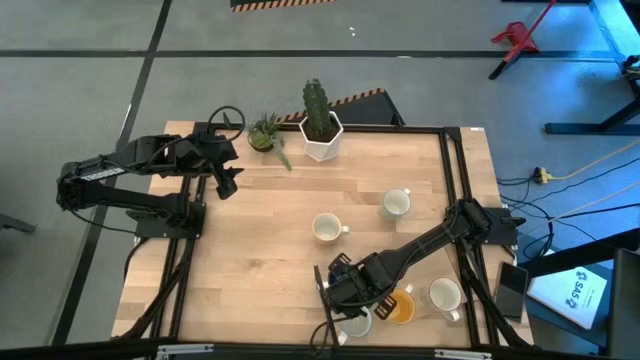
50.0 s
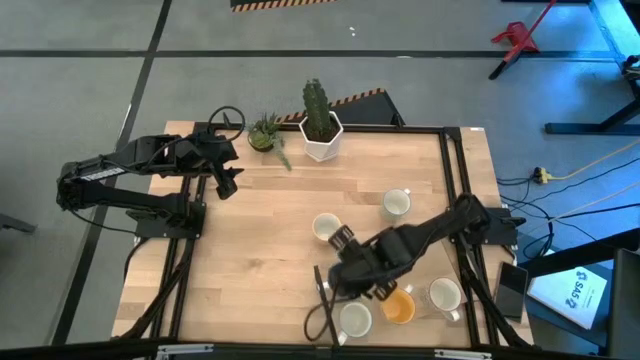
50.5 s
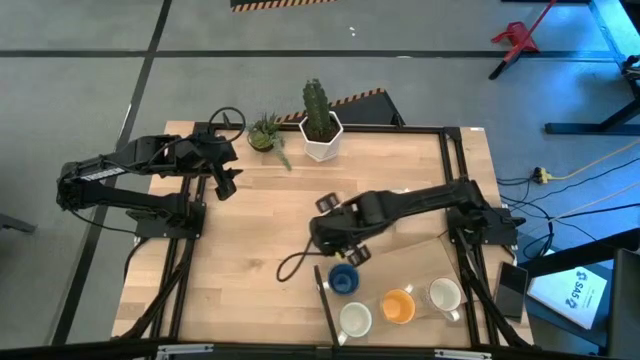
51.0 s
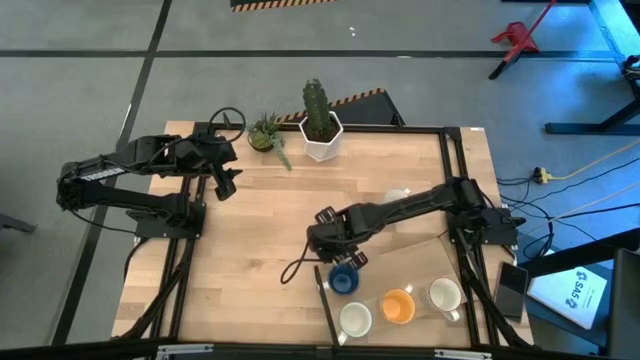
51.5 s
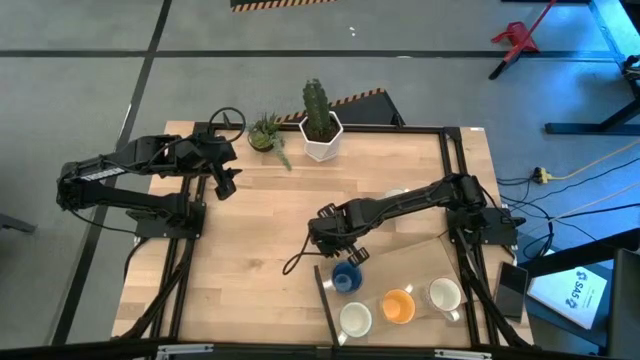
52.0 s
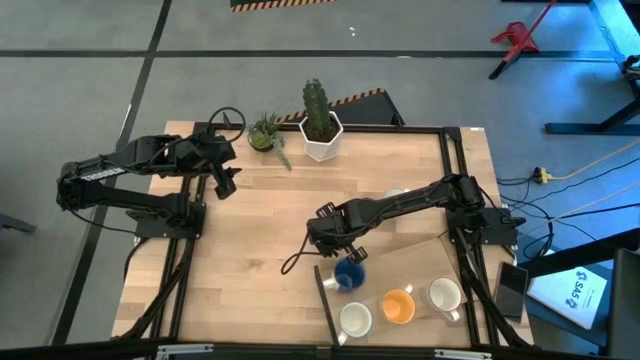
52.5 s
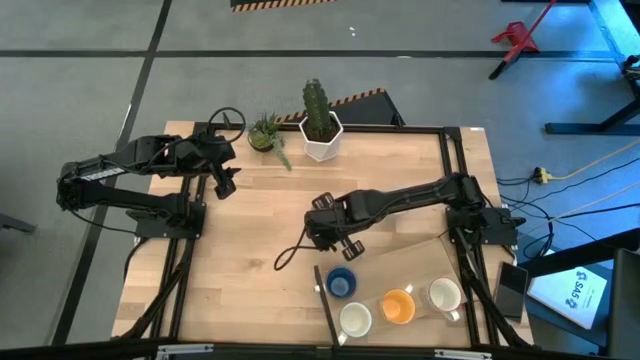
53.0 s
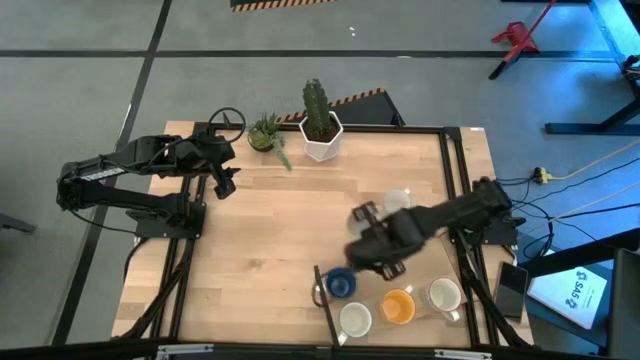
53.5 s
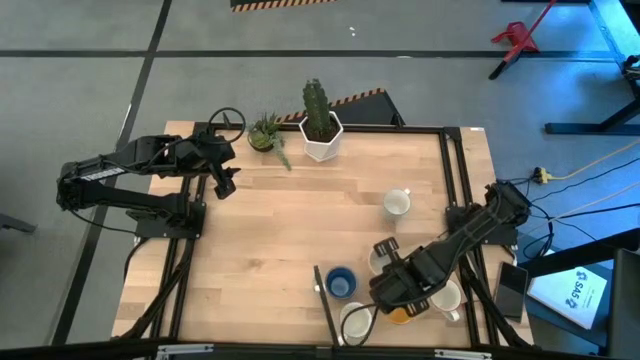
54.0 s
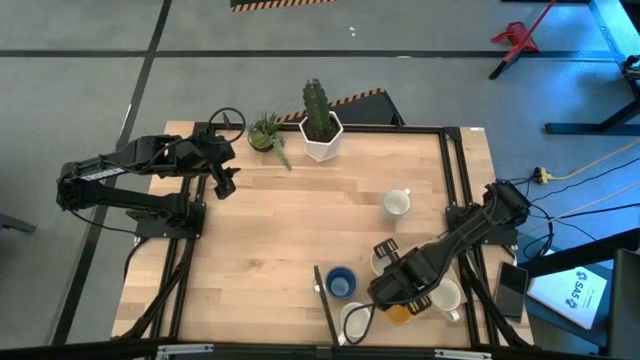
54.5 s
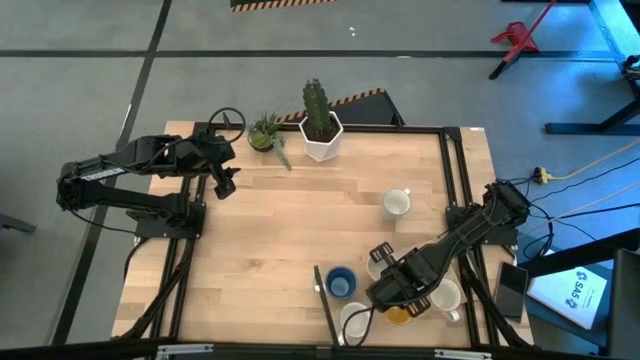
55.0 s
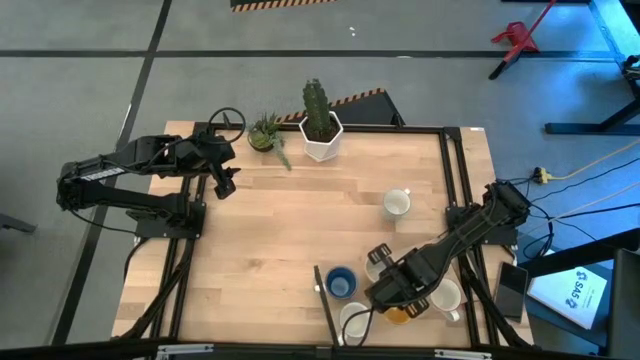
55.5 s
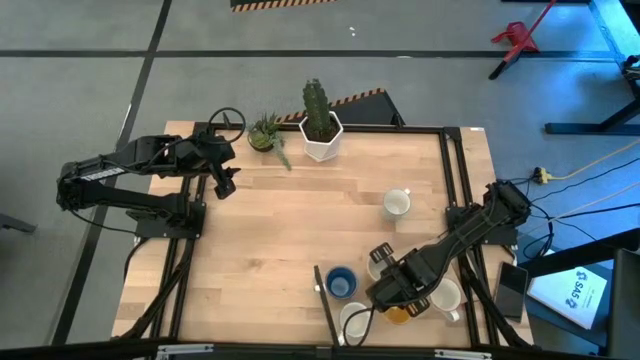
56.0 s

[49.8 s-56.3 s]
Task: Place coffee mugs
Put the orange mug on the shelf

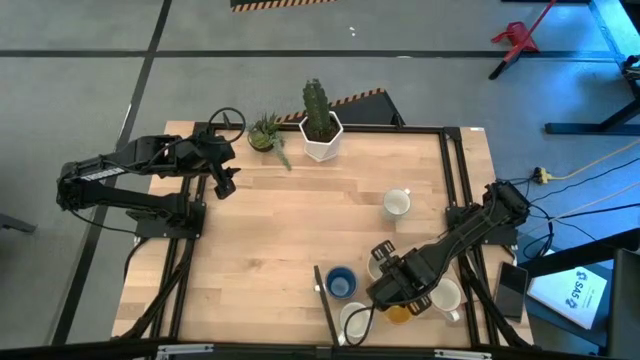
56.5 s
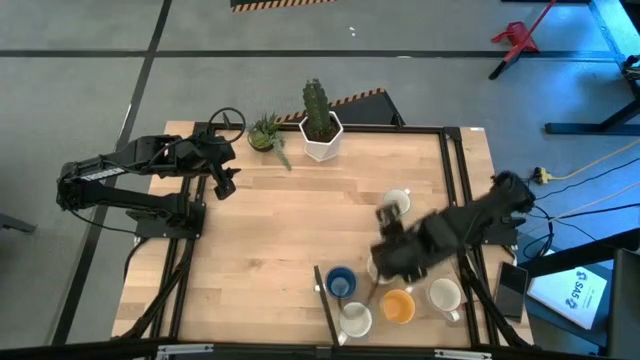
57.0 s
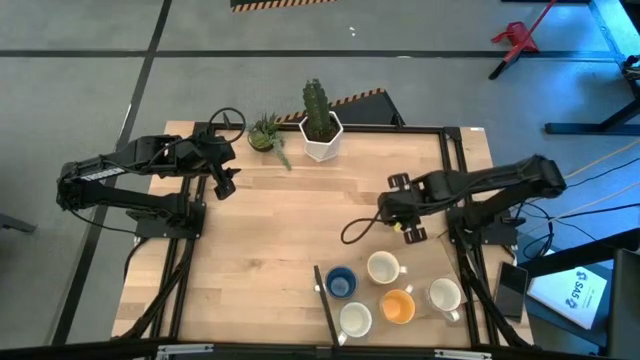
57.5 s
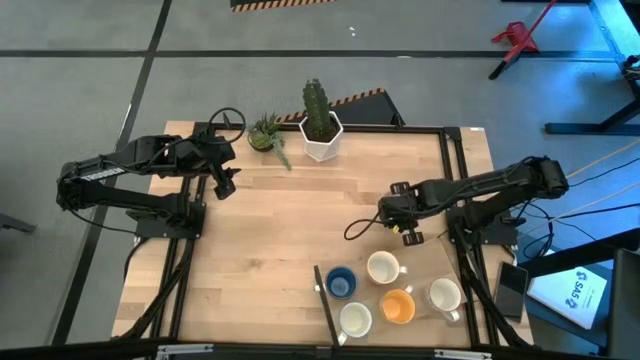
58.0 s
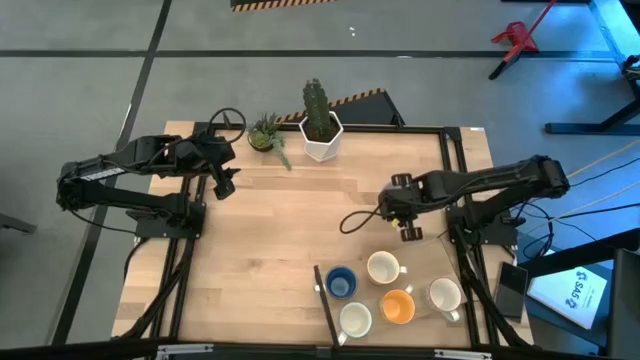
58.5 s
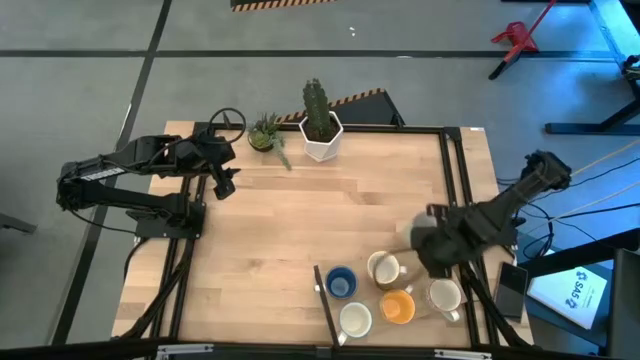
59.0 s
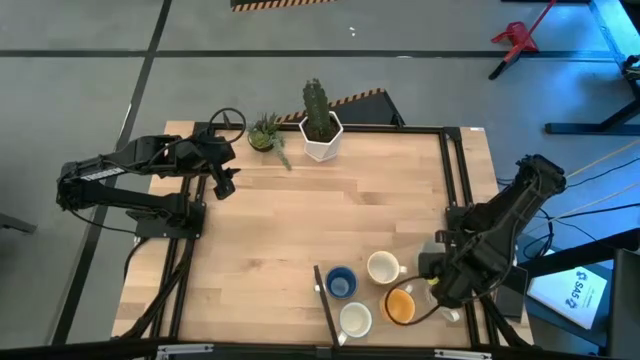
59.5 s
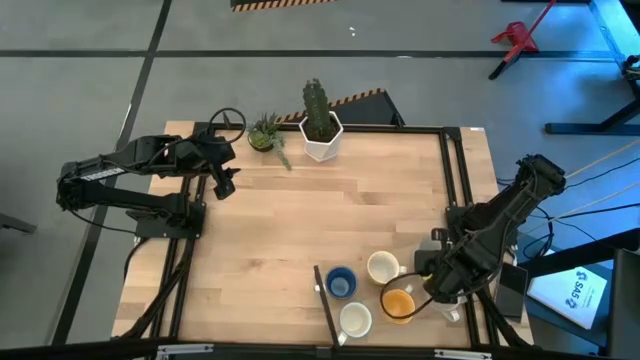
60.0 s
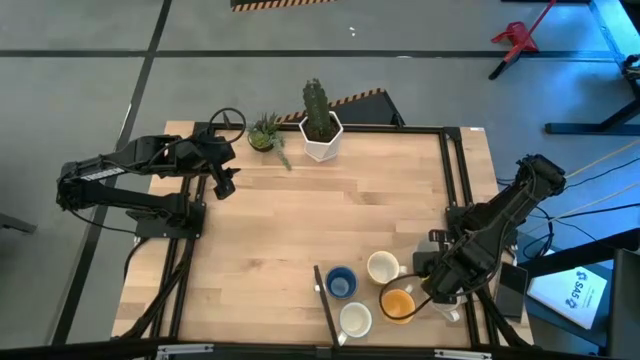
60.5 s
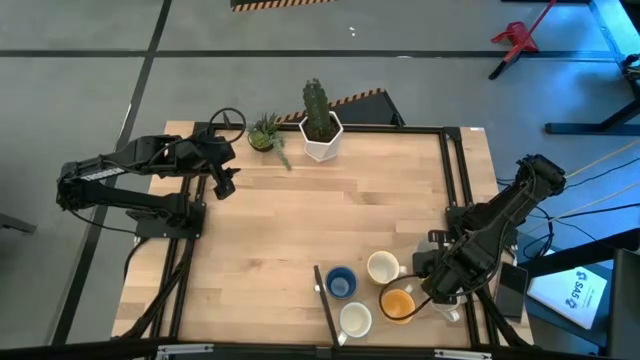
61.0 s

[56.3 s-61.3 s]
Put the green mug on the shelf

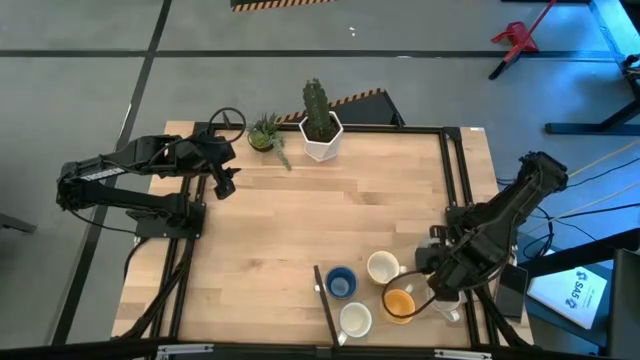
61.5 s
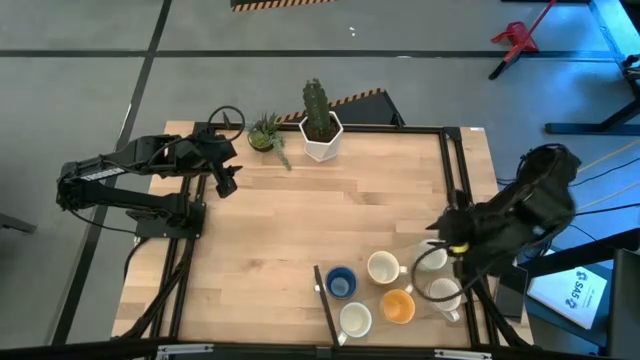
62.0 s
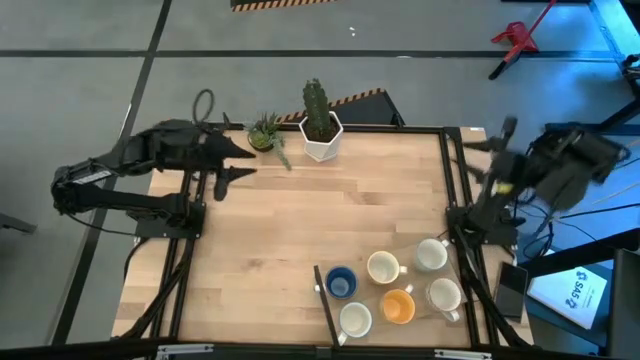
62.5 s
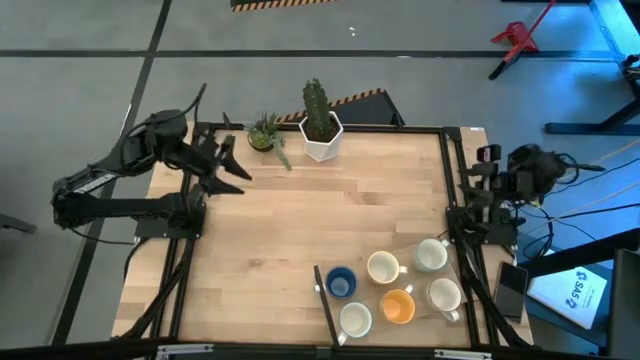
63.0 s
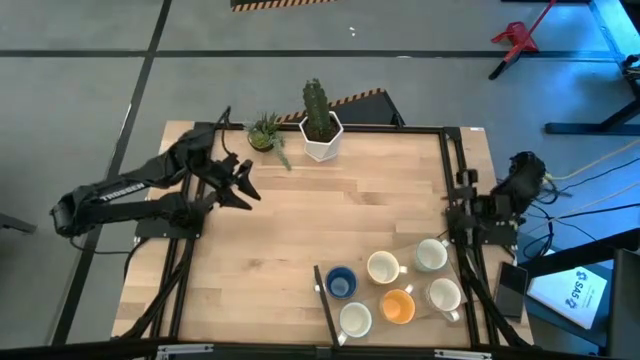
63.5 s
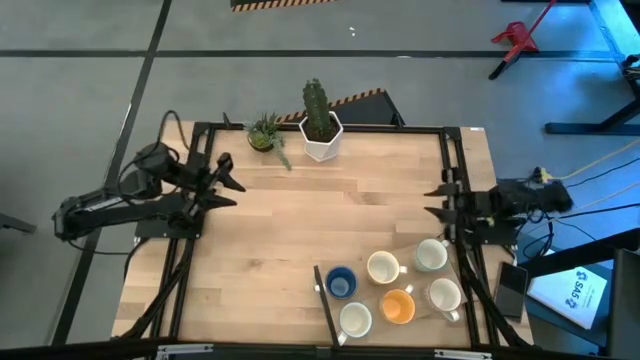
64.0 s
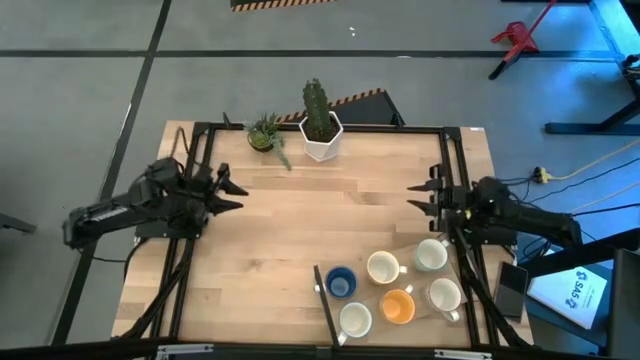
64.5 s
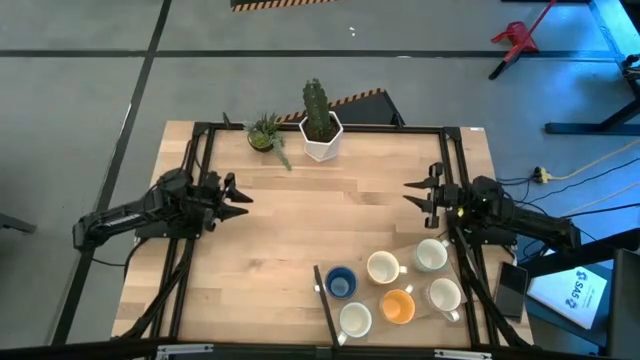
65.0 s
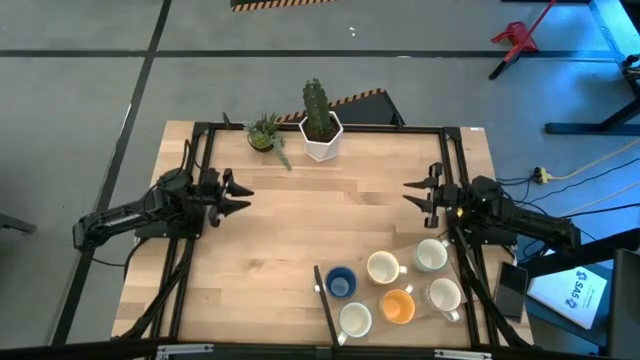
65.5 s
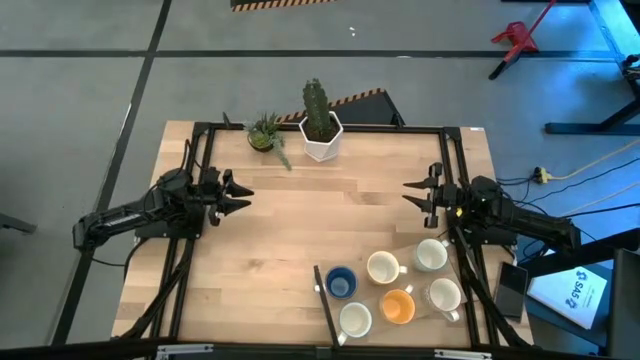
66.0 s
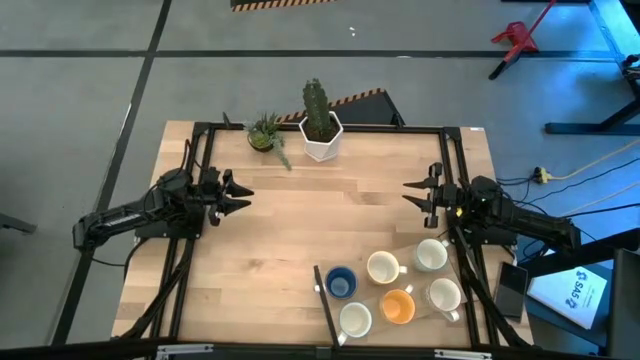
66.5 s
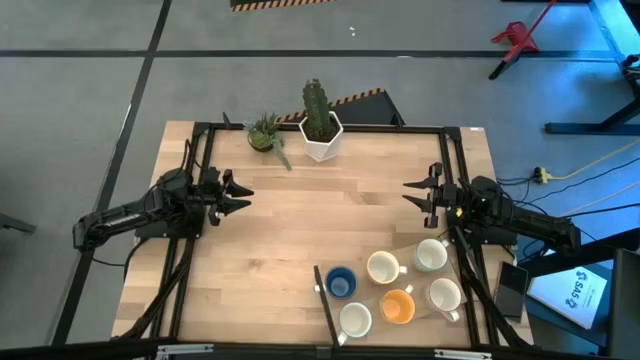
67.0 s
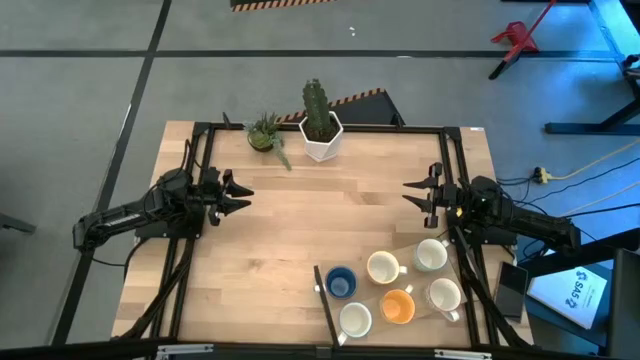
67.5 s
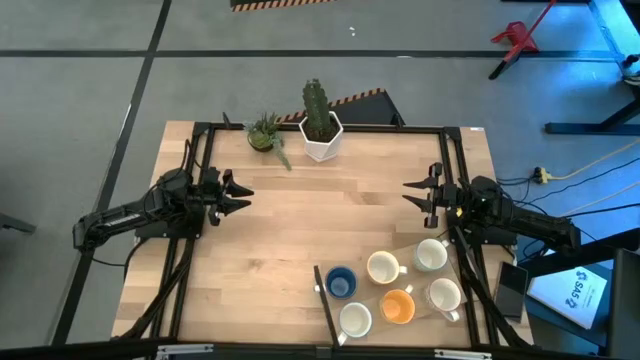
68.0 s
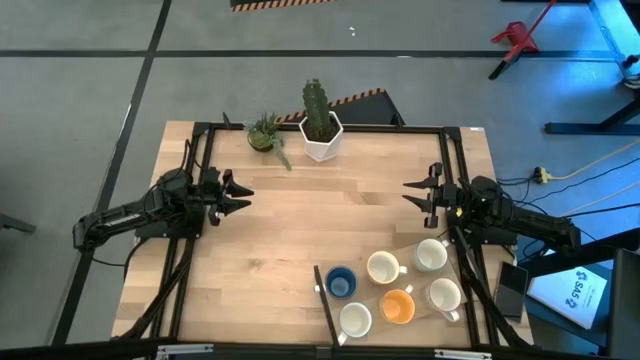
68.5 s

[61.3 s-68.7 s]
Return to Home Position

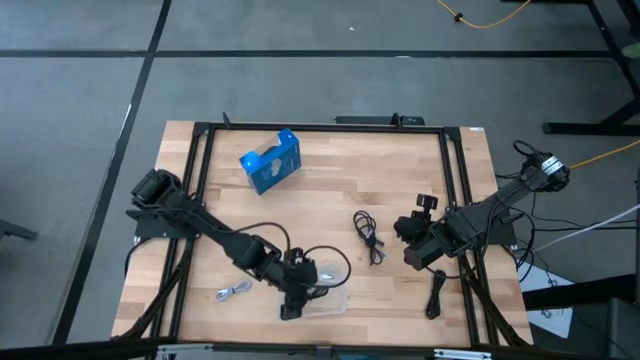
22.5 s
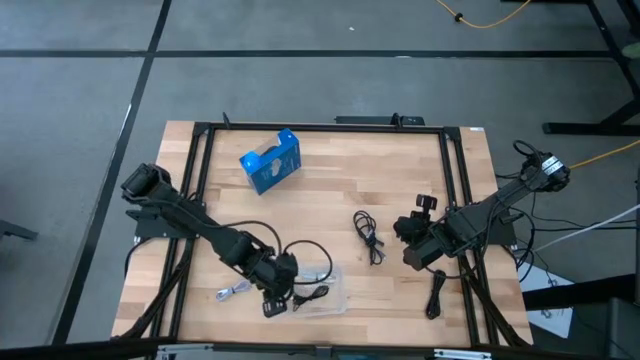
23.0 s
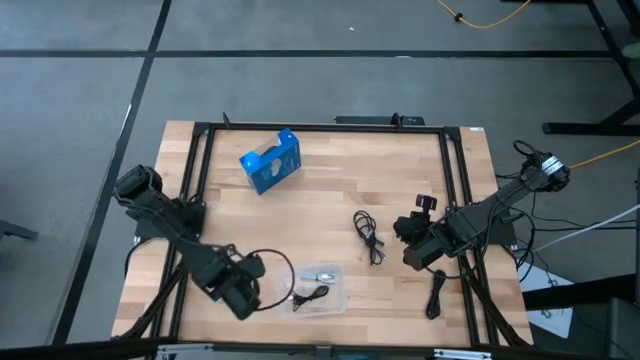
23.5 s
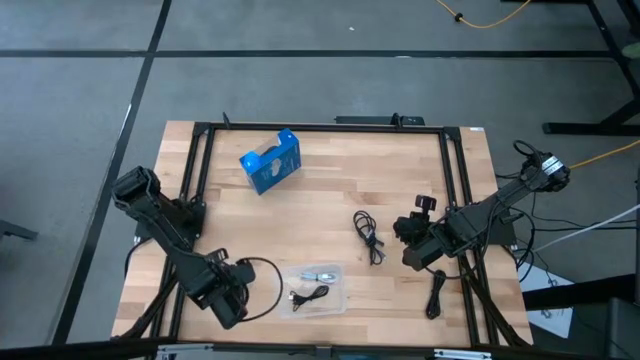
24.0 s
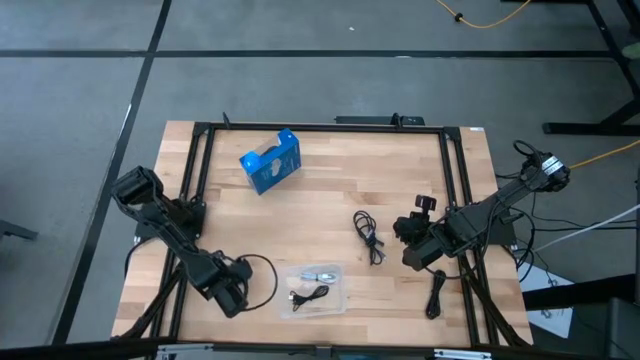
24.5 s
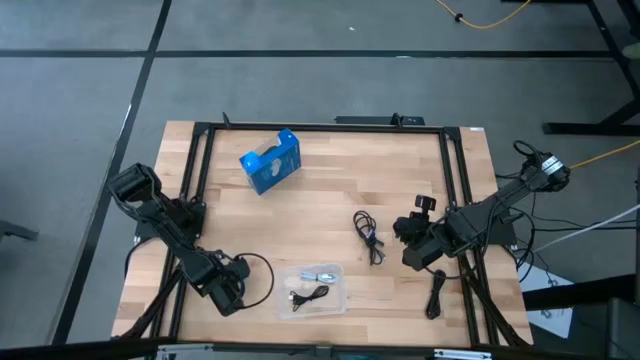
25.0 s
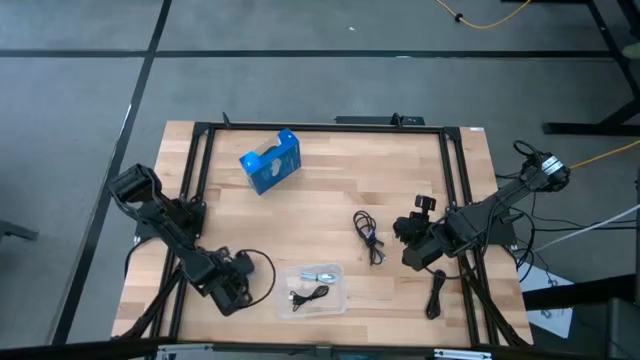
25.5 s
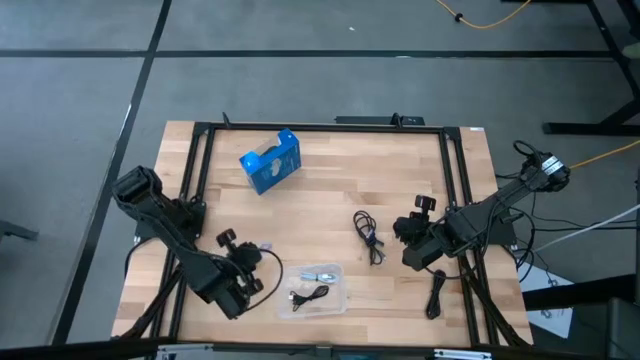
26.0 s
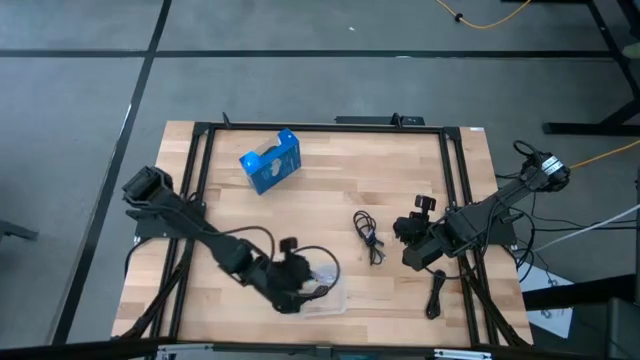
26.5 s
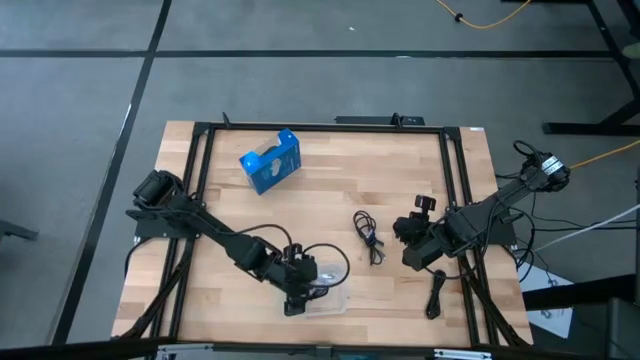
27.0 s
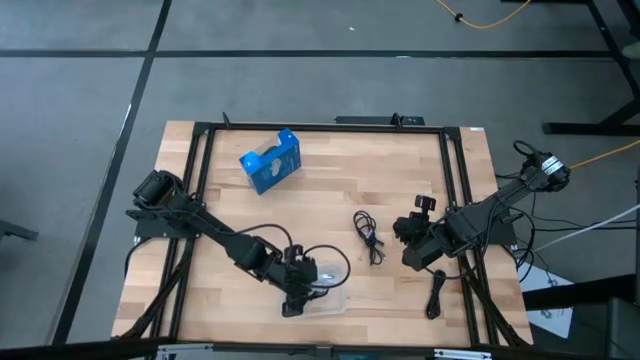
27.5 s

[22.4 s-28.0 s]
Task: Pick and place USB-C Cables
Put the gray charger cable into the transparent bin
